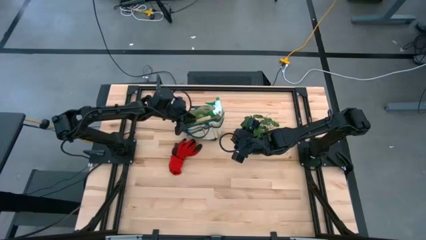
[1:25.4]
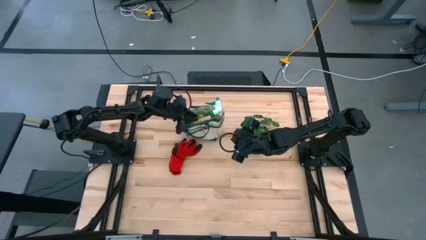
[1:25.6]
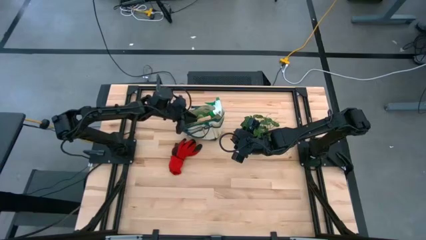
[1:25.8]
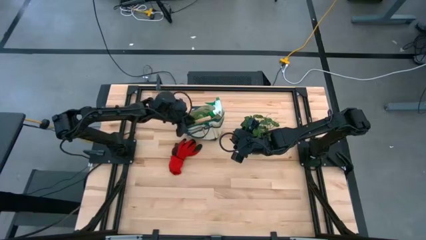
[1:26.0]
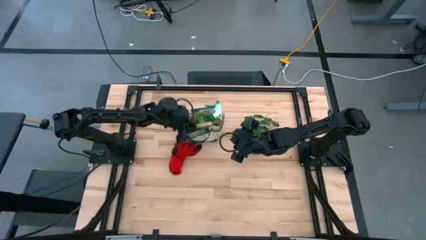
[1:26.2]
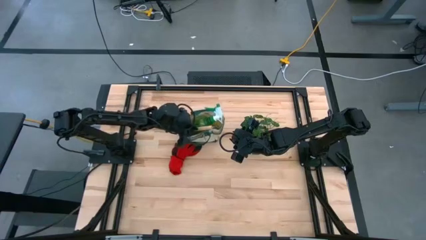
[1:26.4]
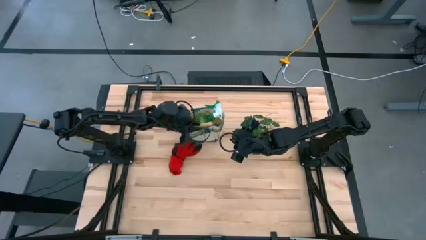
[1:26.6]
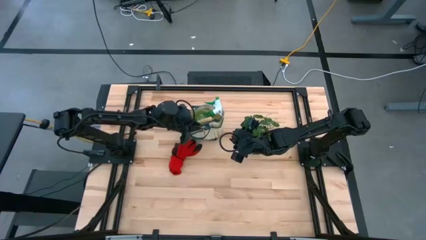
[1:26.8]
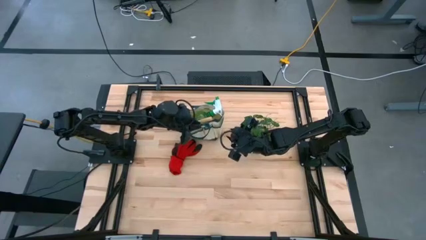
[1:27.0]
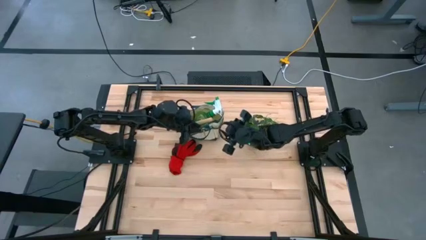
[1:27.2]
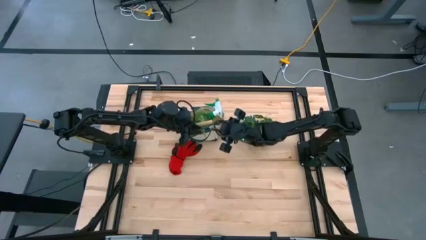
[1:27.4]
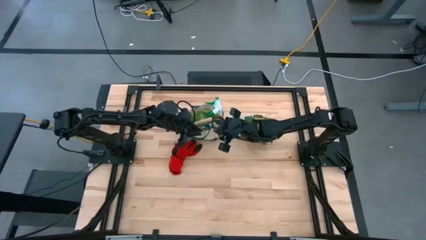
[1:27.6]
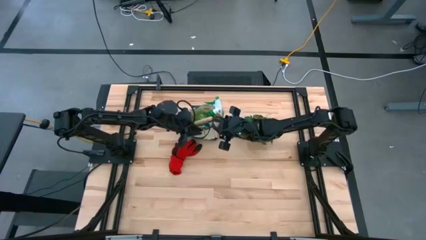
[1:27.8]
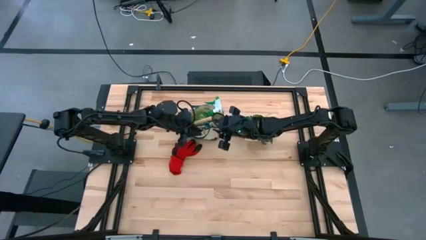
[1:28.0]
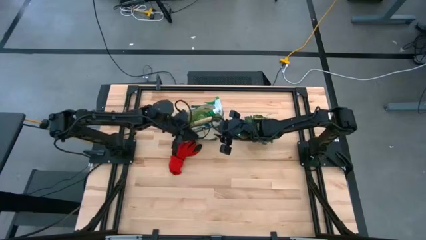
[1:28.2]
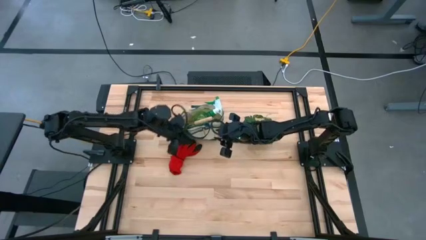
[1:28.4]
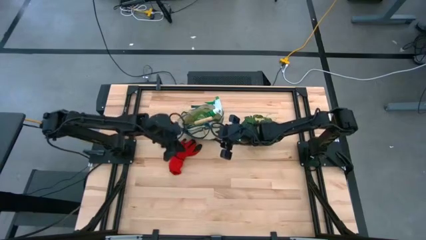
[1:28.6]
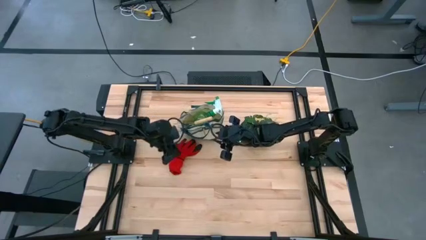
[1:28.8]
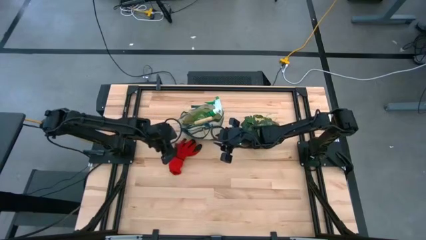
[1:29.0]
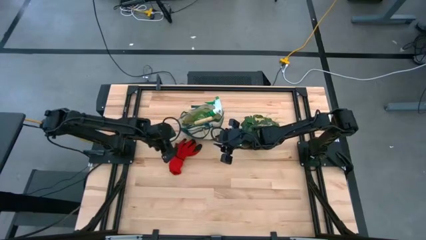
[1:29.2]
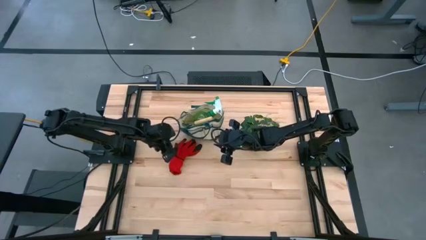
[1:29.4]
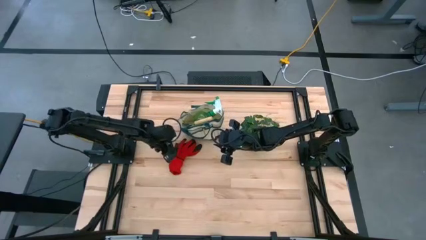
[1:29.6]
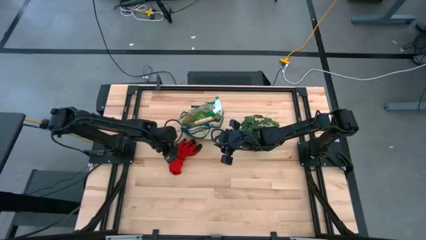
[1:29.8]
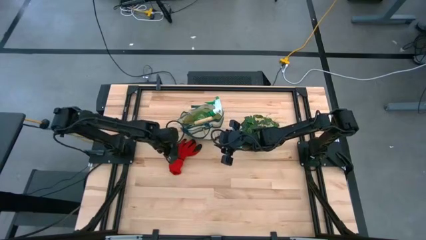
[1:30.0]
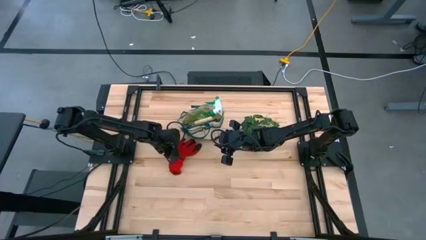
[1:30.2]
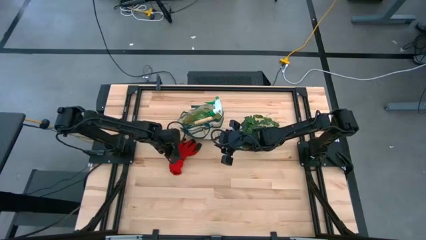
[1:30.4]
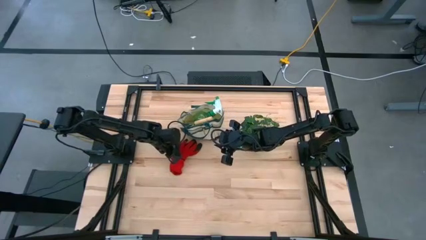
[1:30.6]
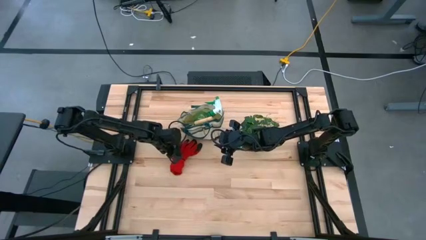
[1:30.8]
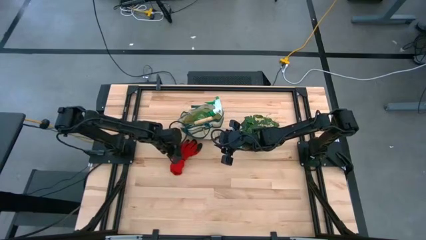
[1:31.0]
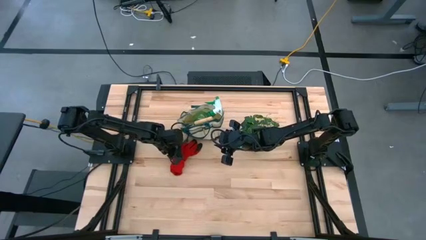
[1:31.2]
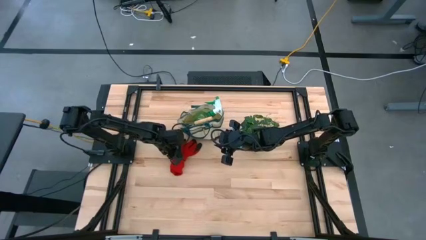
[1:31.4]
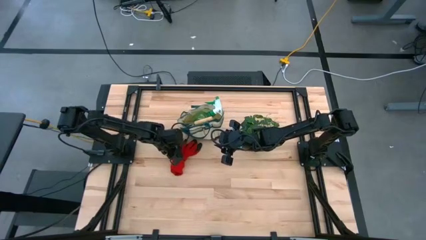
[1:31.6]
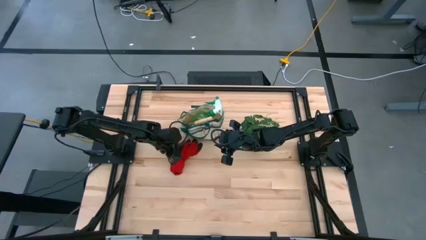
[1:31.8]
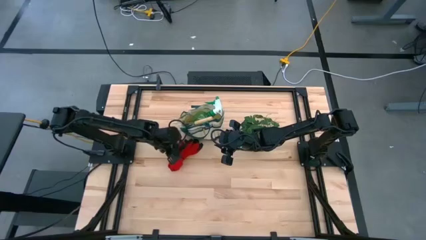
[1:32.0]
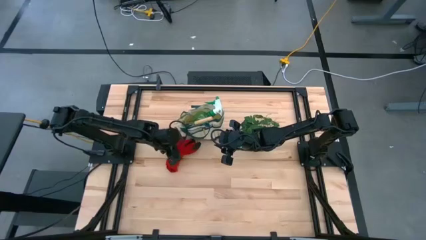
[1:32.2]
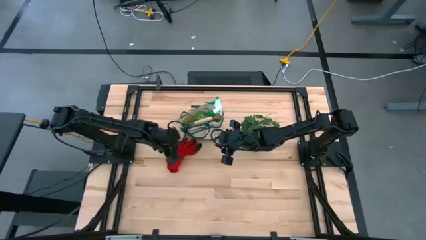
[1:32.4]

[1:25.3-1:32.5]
Task: Pick & Place Garden tools in Gardening bag
Put the red glove into the green gardening bag

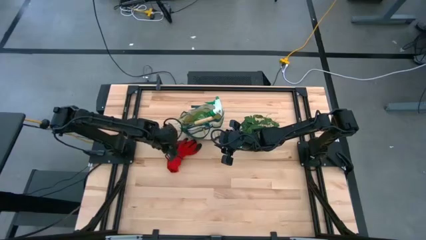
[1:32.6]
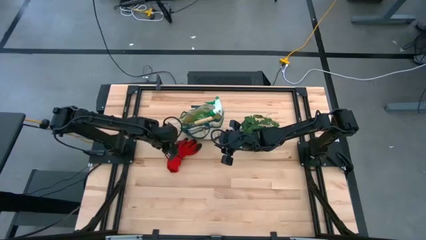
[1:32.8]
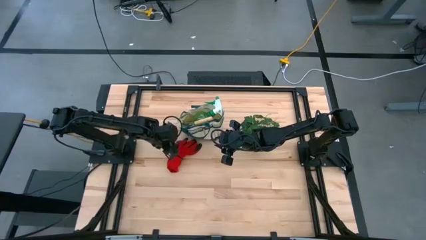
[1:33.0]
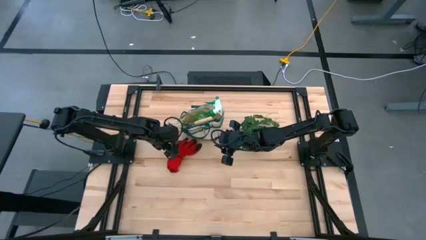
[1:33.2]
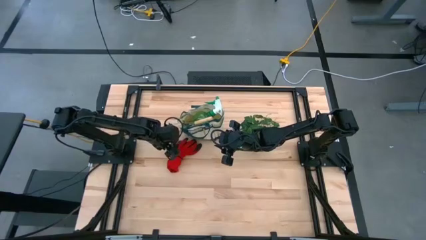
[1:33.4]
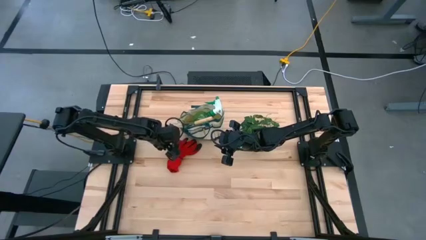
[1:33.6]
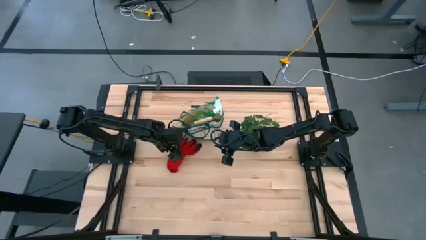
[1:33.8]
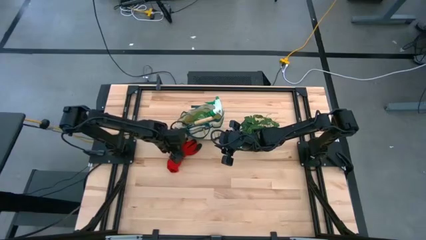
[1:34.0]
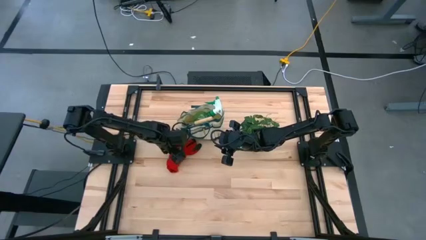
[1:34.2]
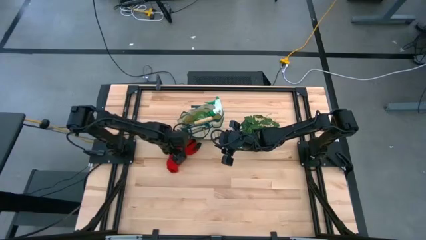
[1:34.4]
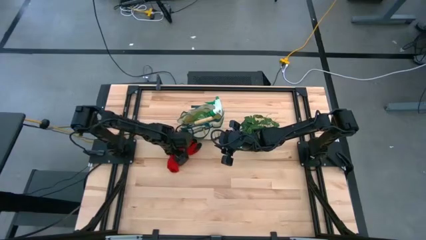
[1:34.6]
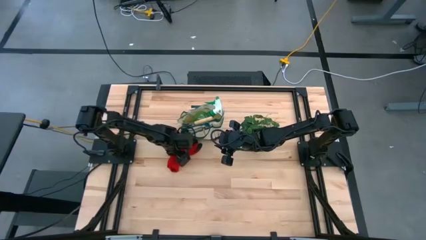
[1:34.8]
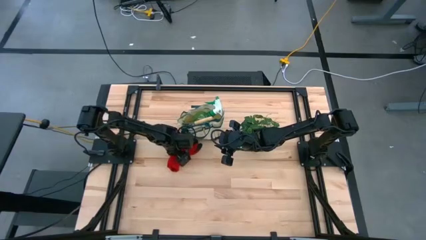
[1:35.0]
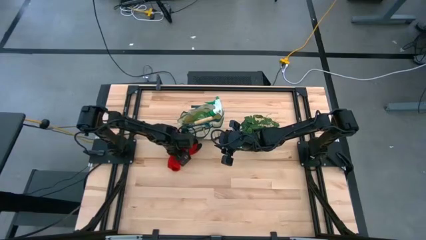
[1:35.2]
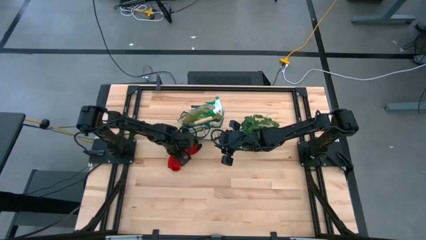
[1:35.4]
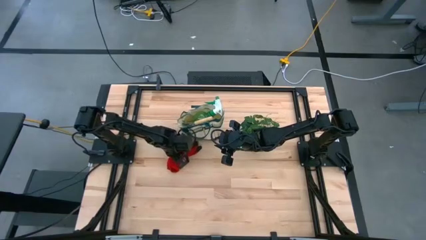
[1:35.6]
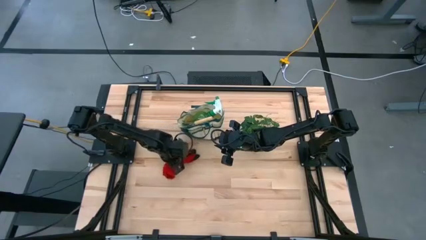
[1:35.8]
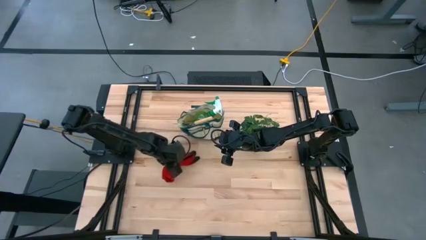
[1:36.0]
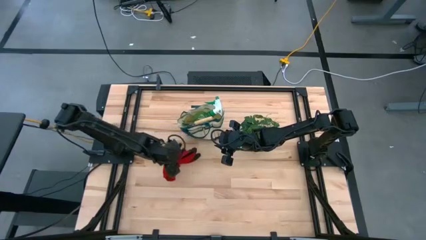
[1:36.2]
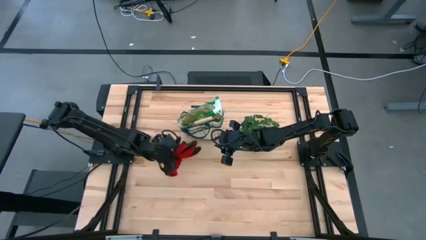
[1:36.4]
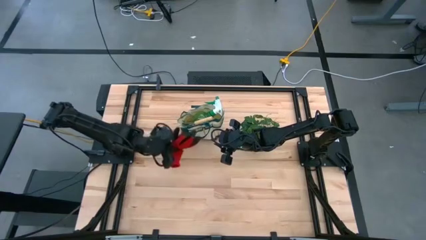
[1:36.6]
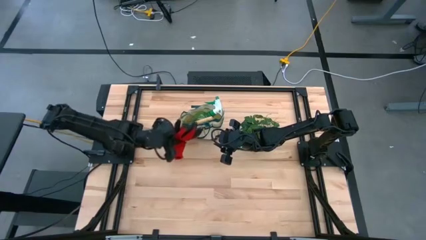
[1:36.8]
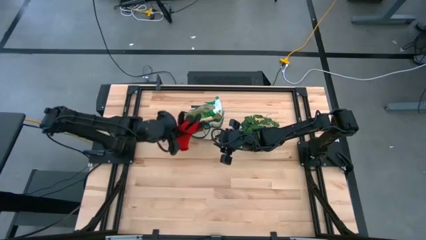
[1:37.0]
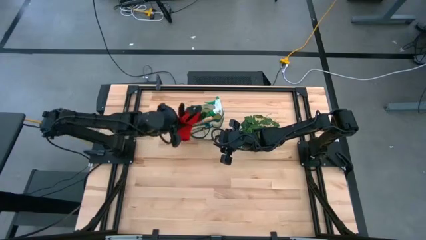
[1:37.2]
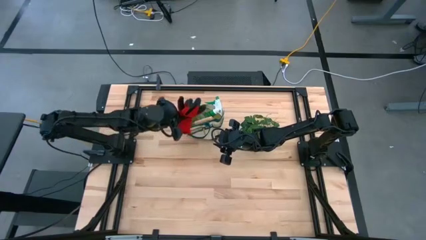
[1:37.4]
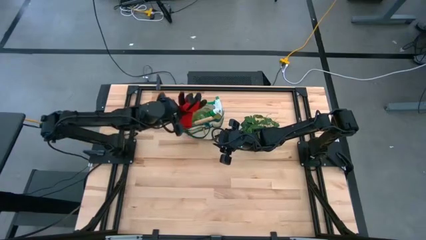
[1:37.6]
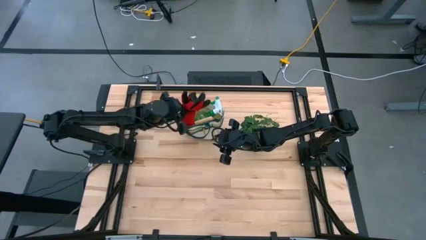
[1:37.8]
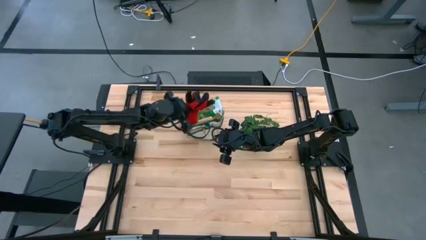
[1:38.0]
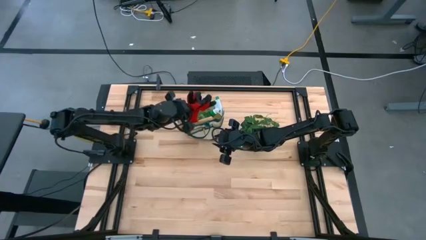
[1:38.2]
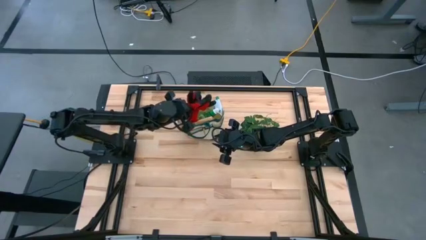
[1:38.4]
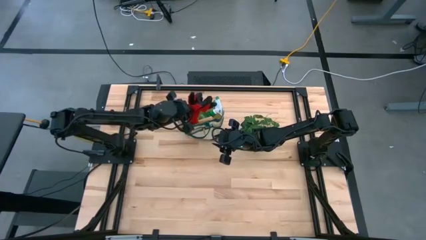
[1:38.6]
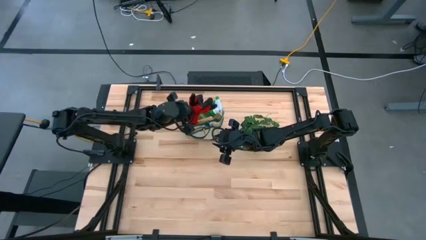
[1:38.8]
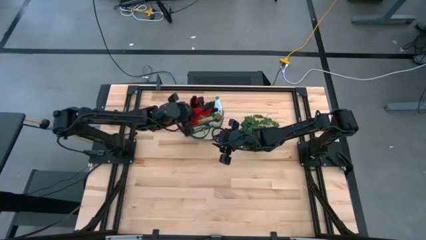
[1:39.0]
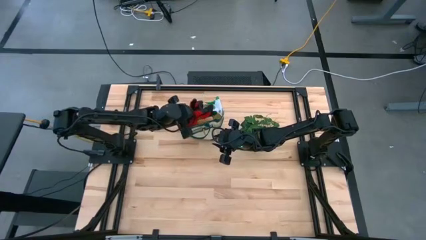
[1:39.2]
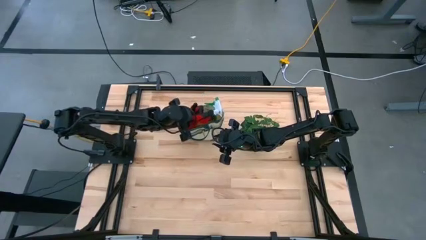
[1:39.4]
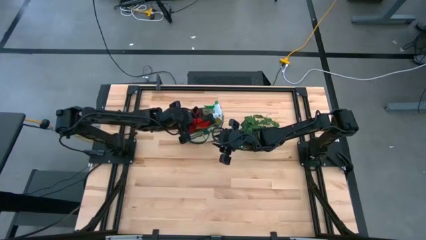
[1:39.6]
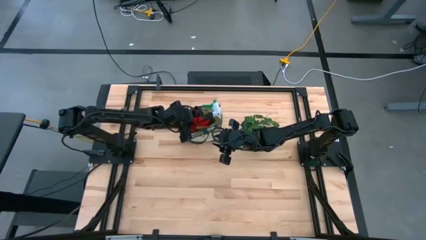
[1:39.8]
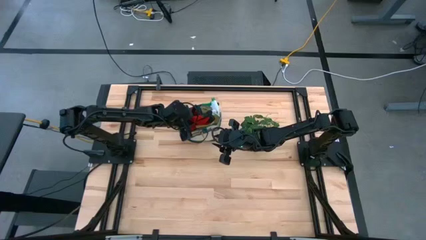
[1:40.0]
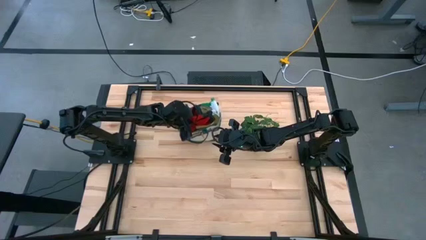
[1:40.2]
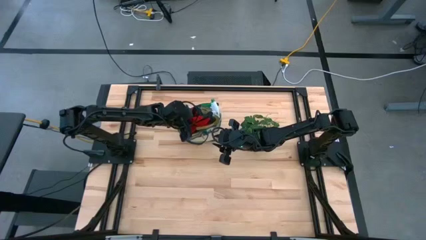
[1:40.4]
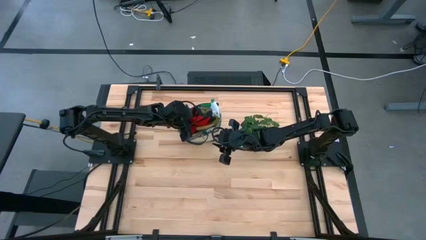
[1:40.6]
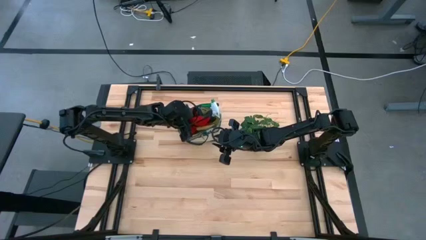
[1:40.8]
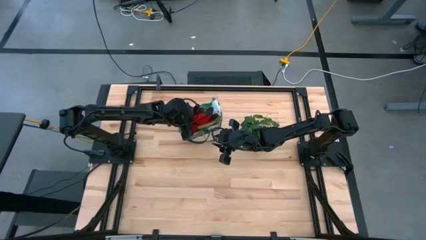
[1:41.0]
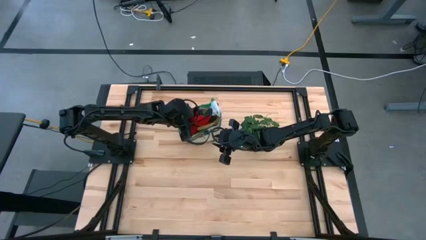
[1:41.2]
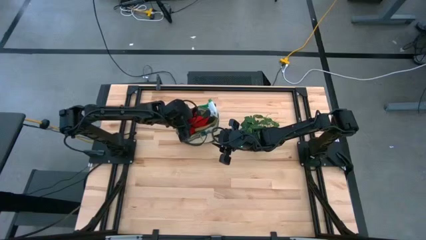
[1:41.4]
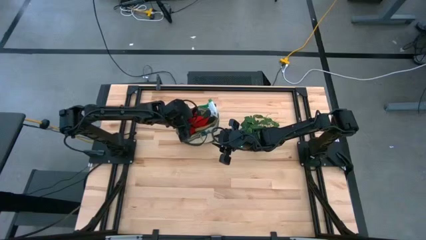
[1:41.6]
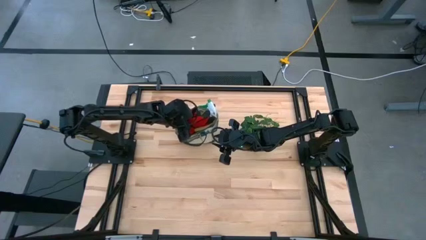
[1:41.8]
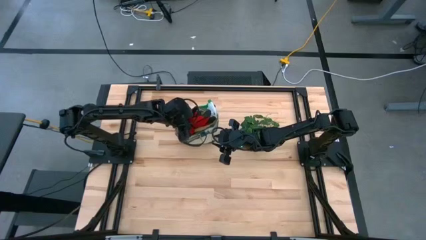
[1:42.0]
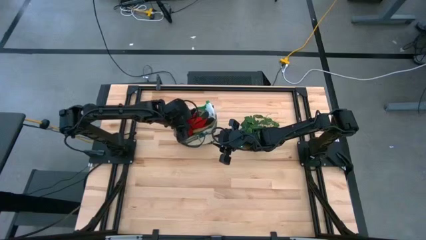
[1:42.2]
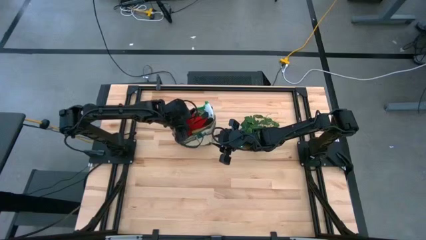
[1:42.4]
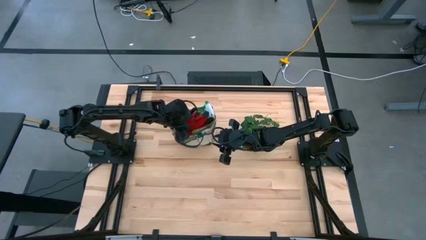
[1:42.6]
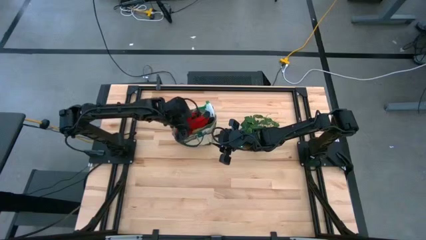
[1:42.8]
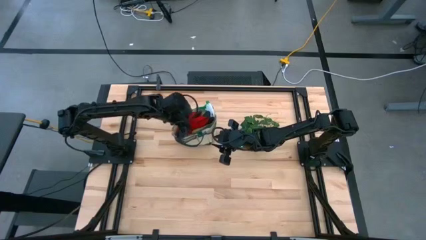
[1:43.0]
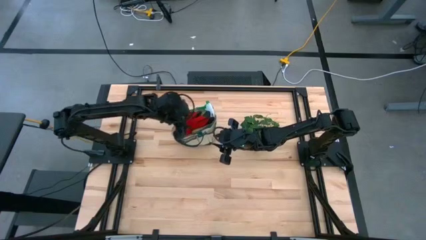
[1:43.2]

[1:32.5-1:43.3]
Put the red glove into the green gardening bag
